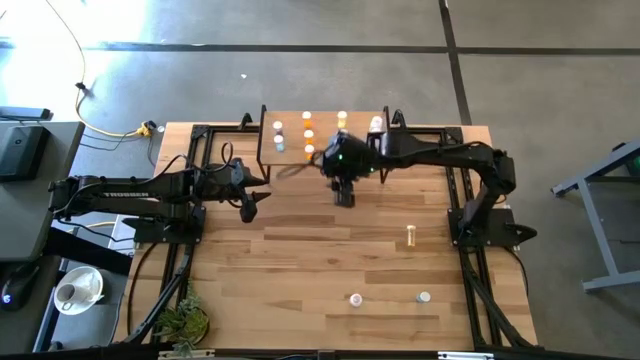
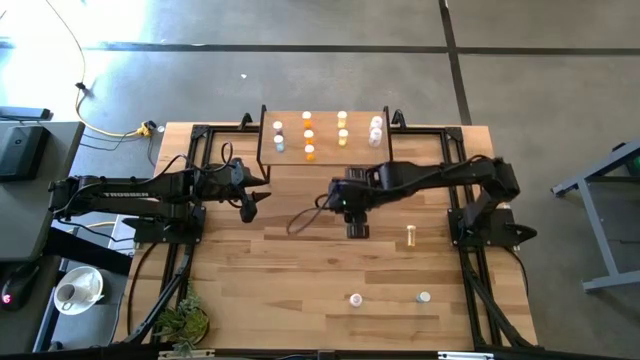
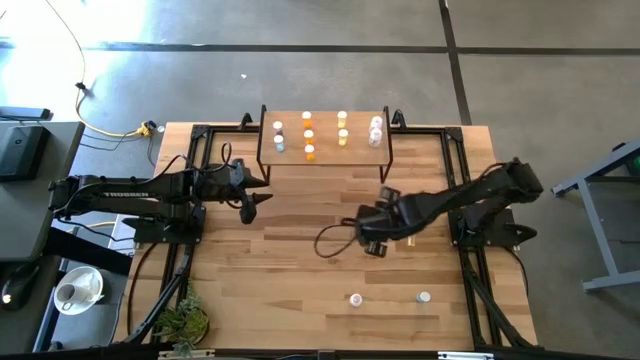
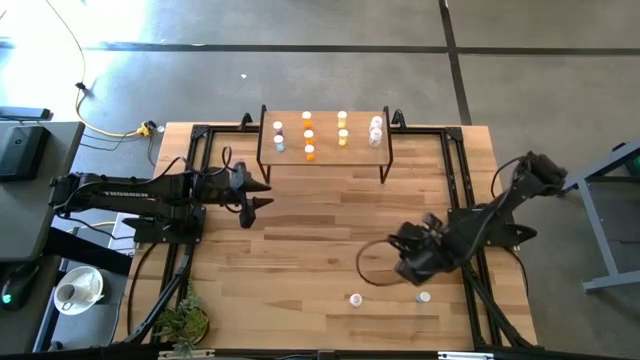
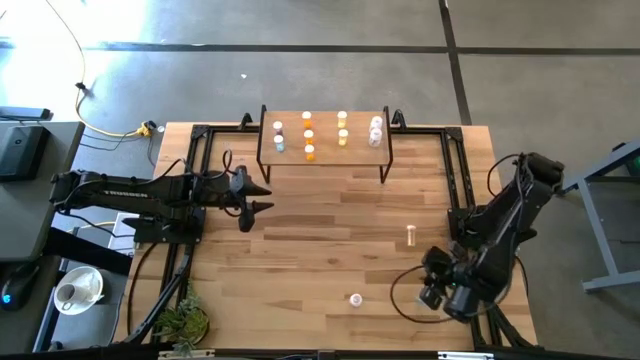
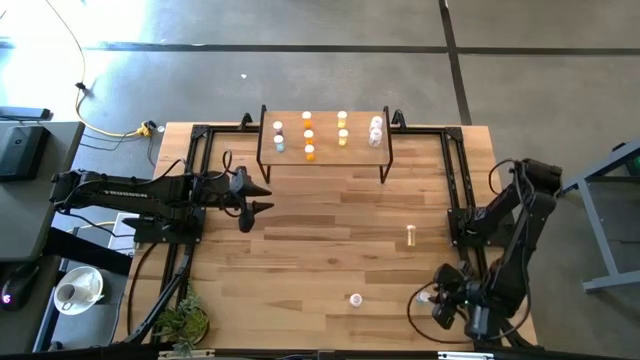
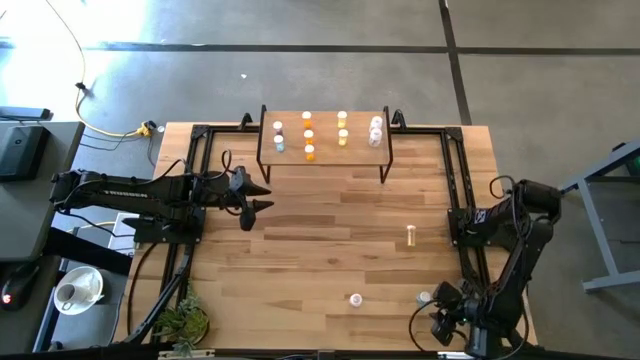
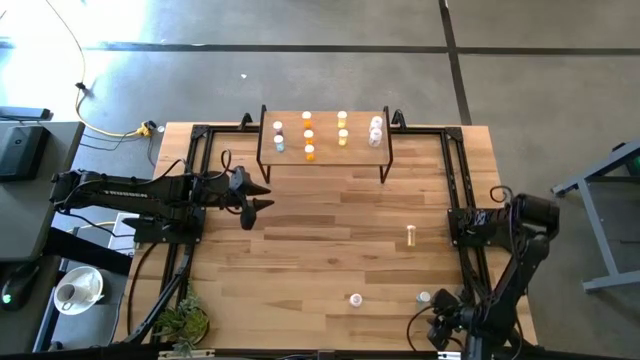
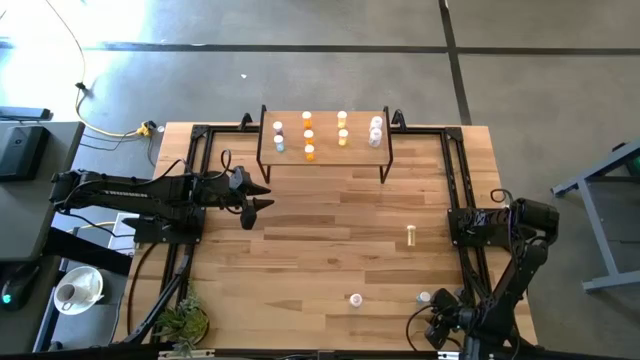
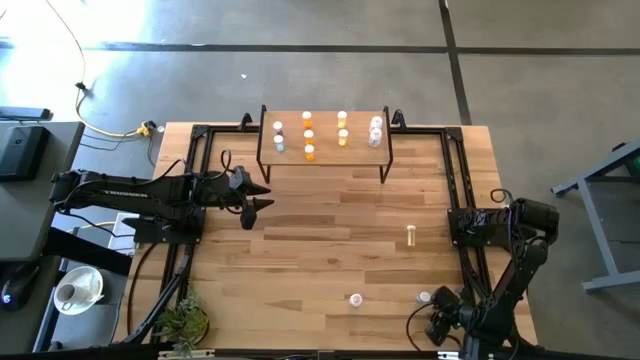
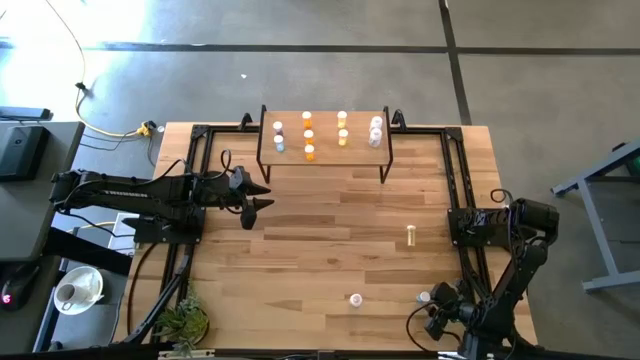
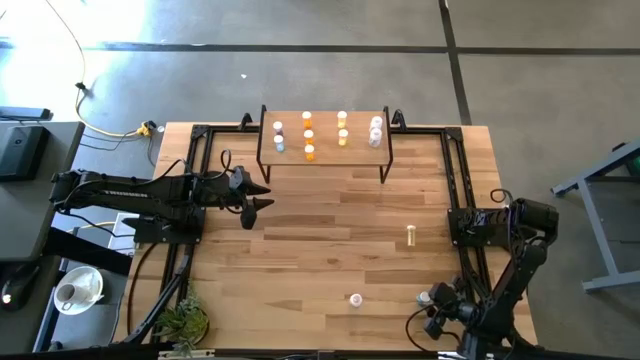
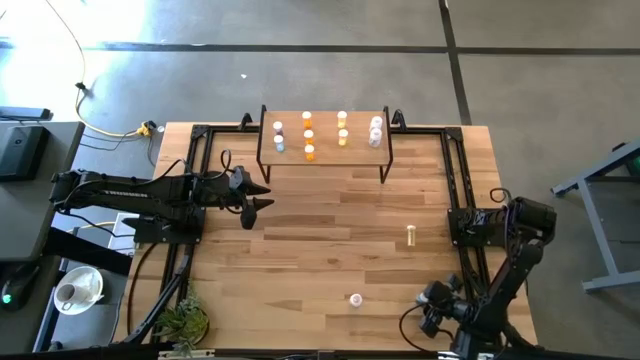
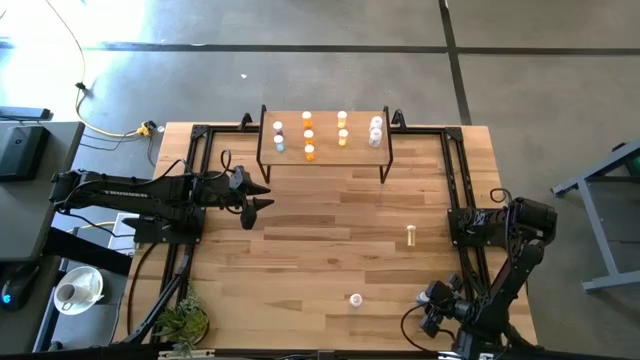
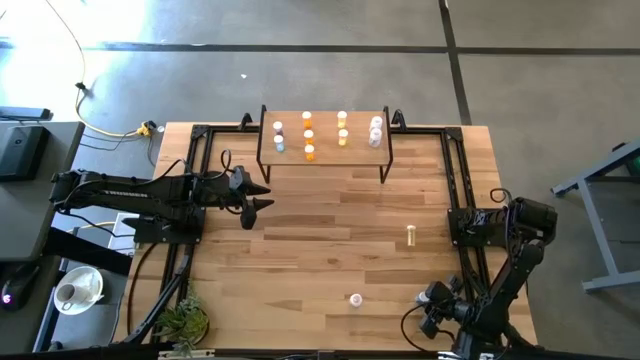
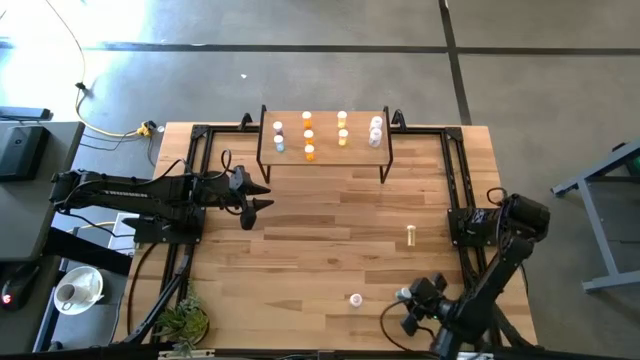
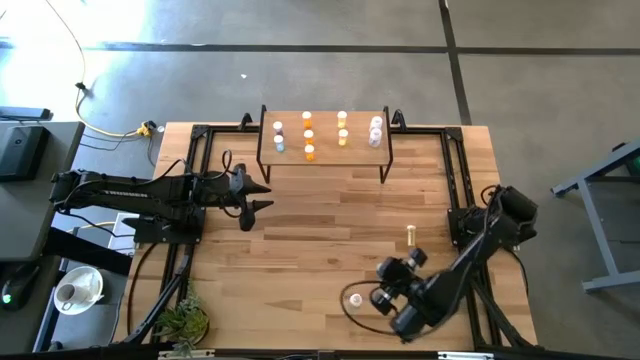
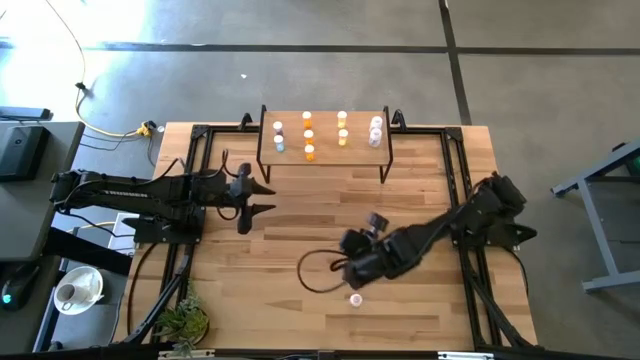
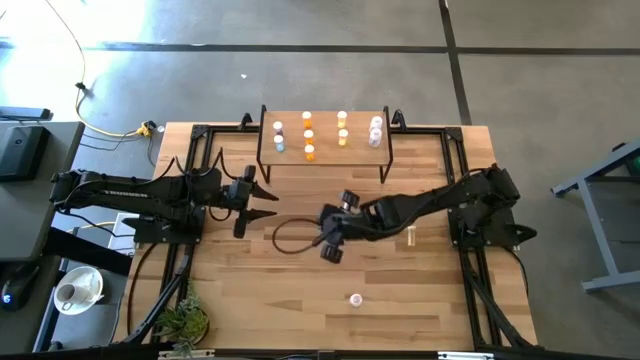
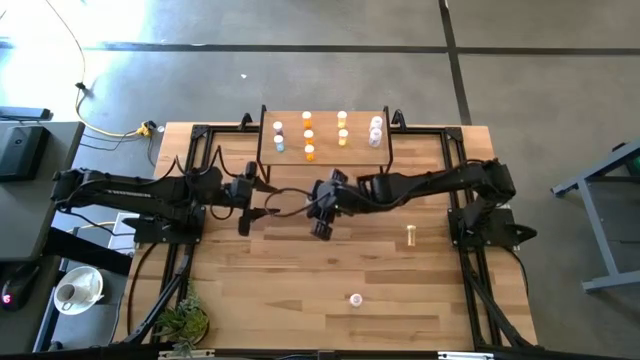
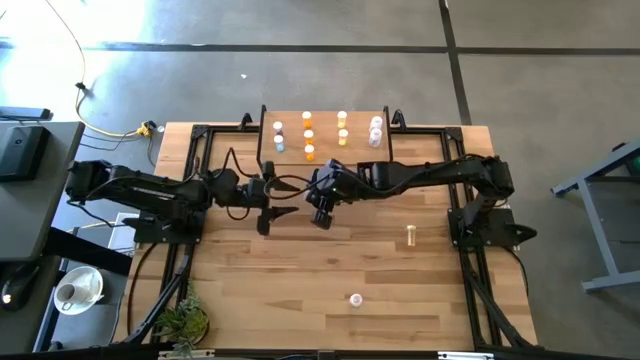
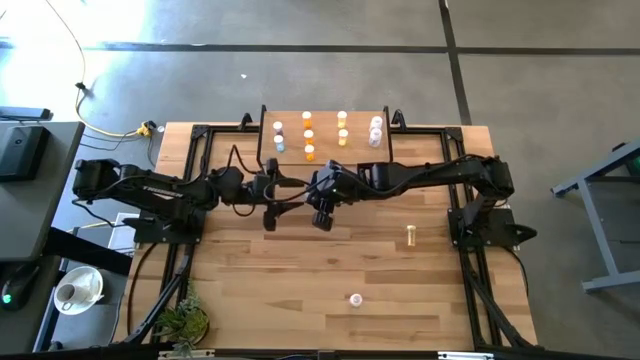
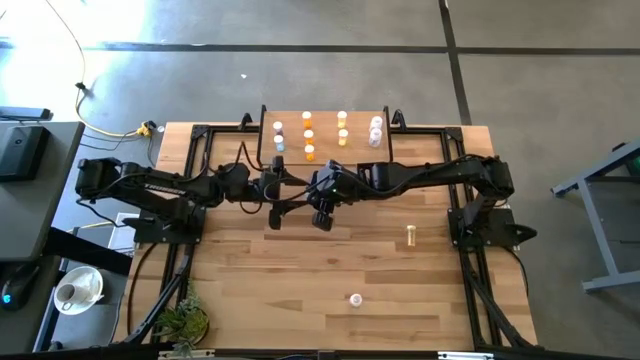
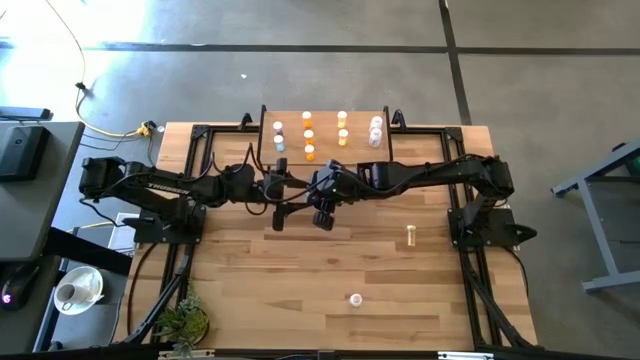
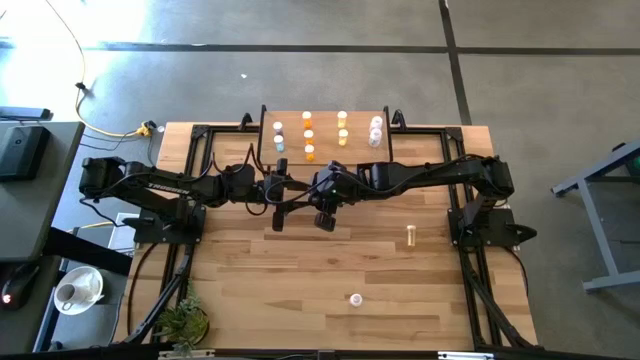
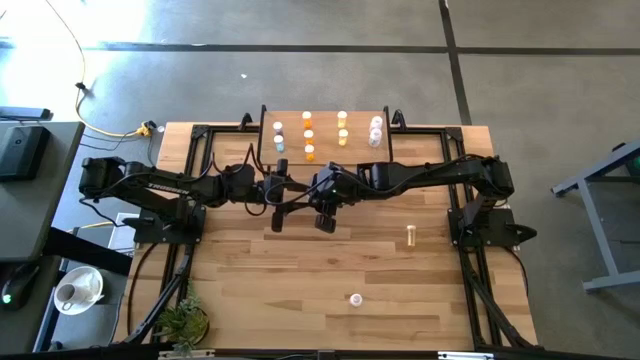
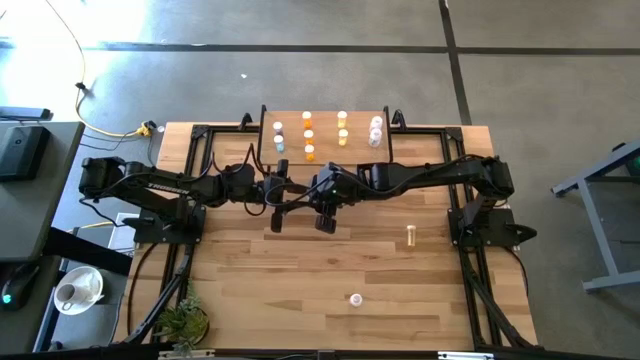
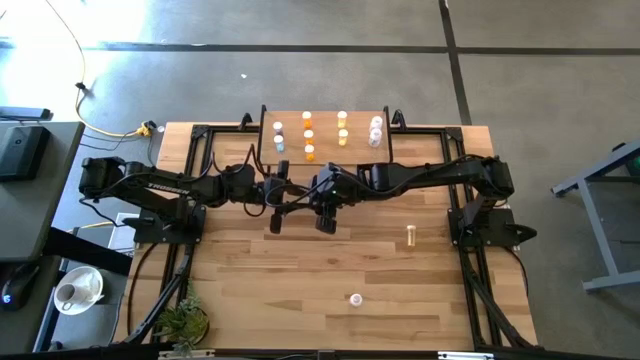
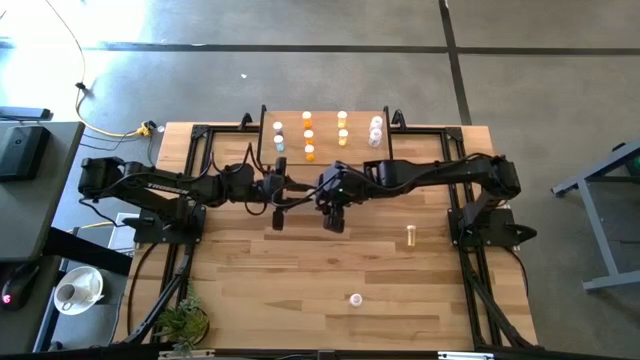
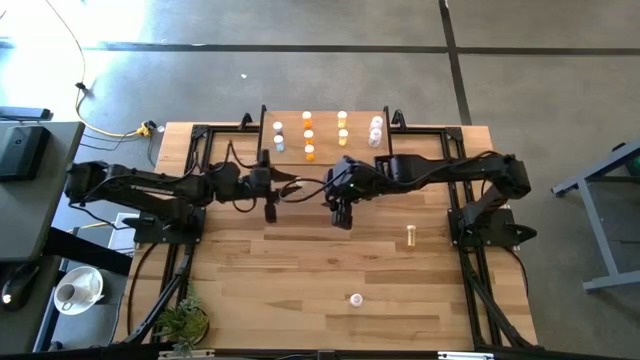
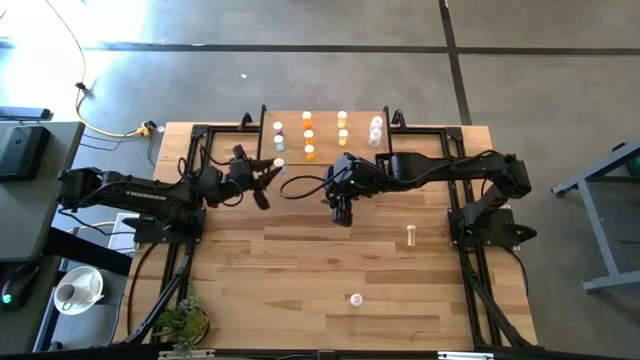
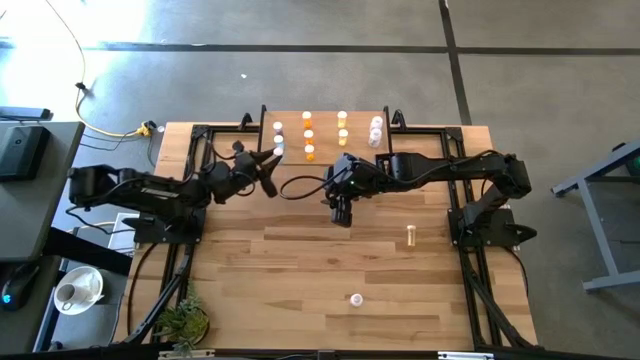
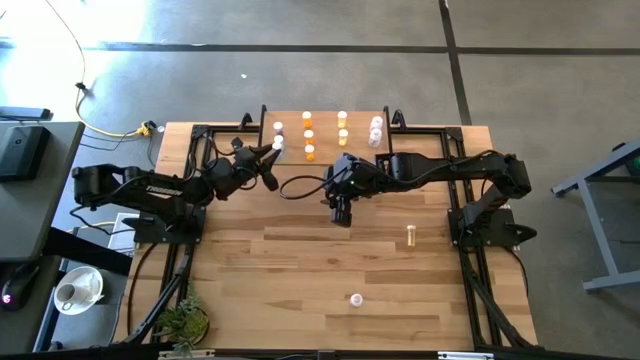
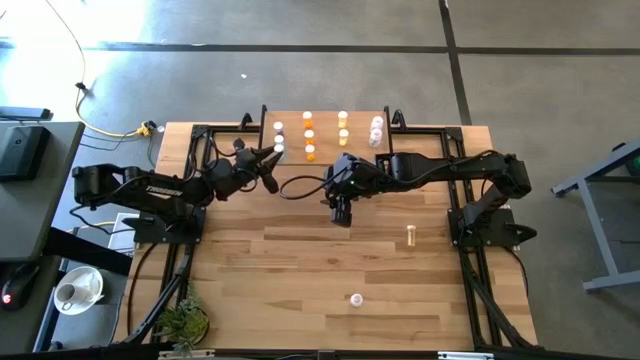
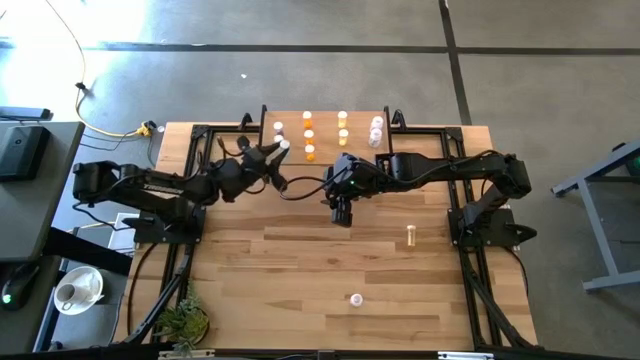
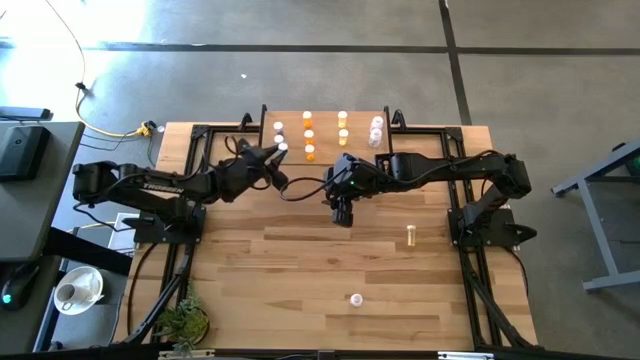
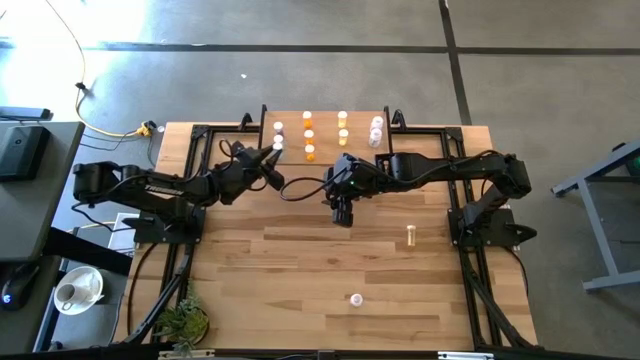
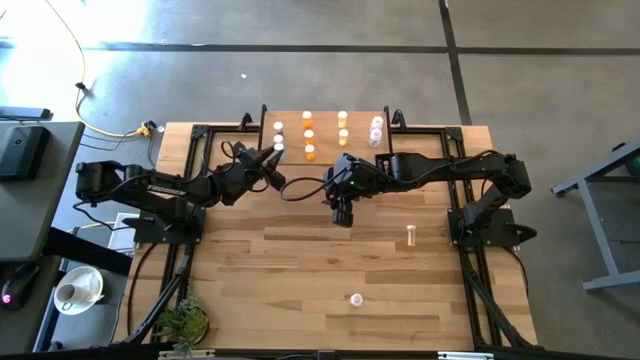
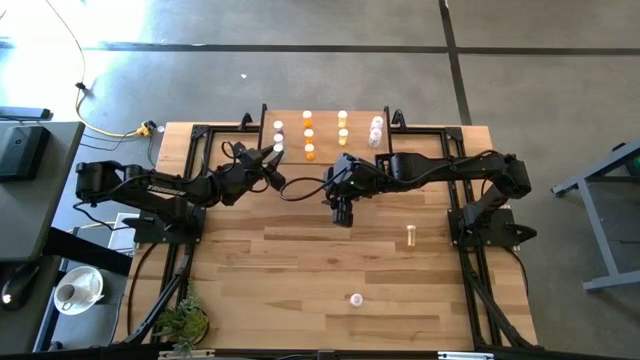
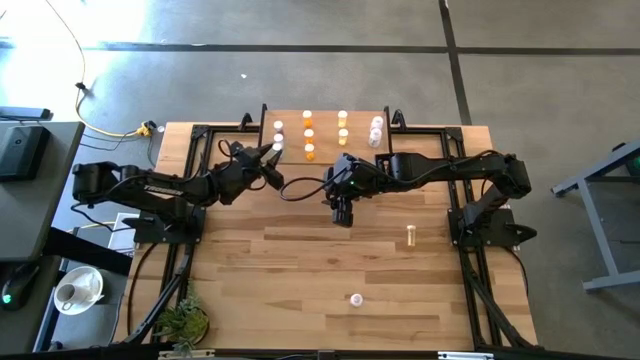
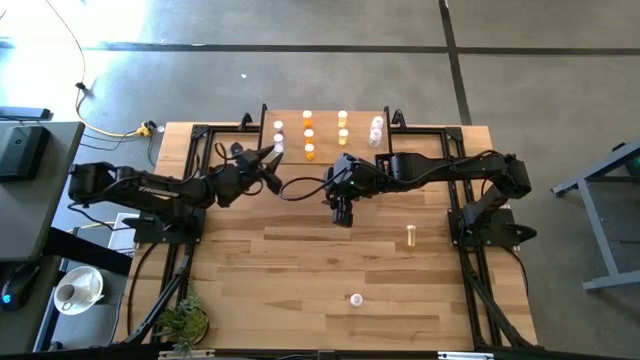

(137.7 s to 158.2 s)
Task: Pick and place medicine bottles onto shelf by color
Put the blue pill bottle on the shelf aligned with the other blue pill bottle

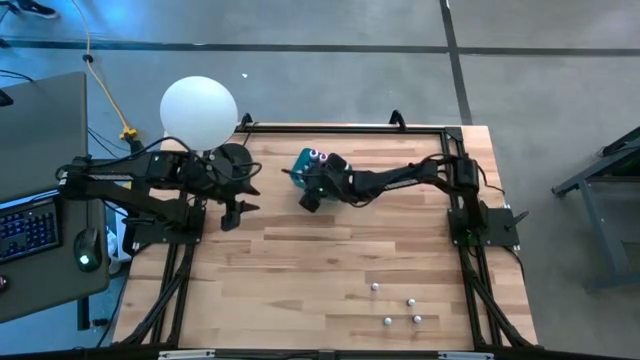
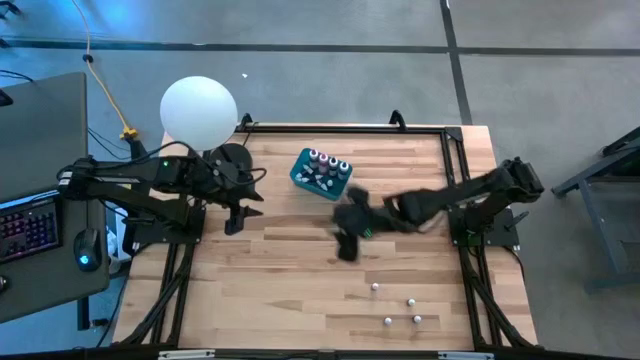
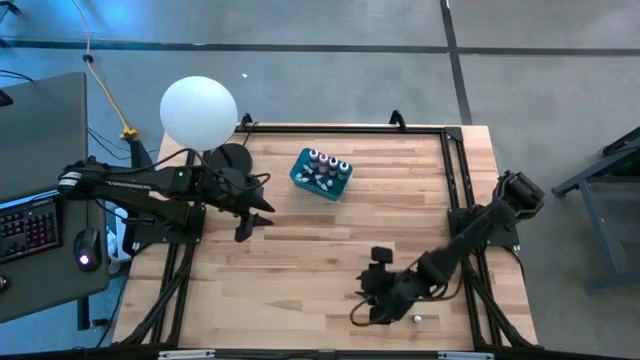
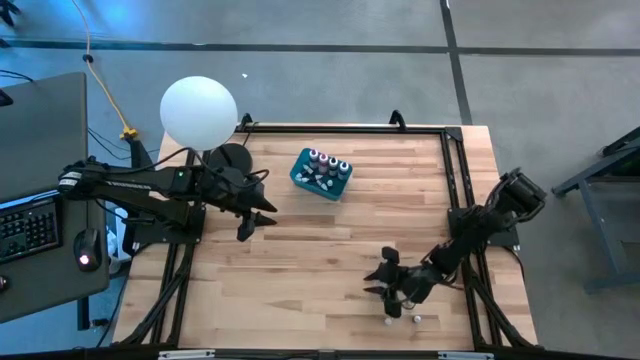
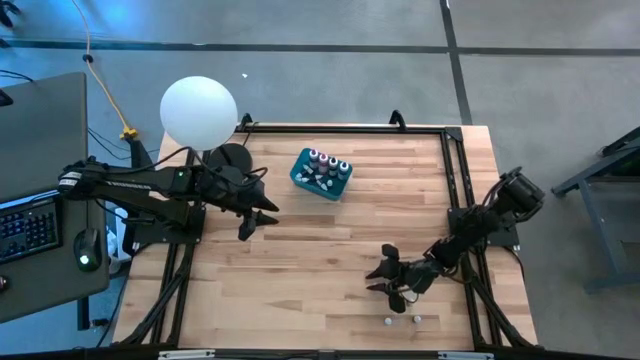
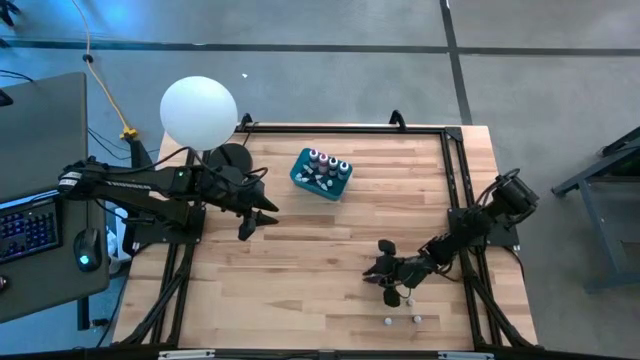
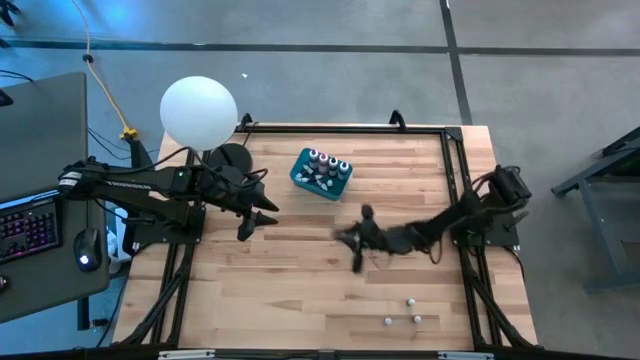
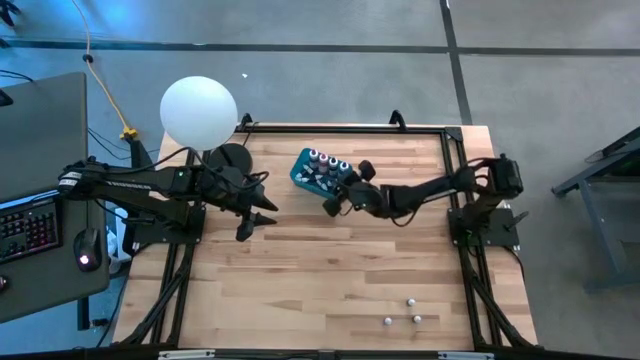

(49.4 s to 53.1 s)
Task: Pick & Place food coloring
Put the black food coloring bottle into the blue bin
